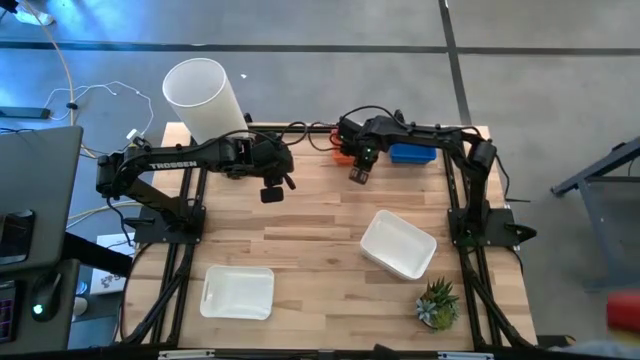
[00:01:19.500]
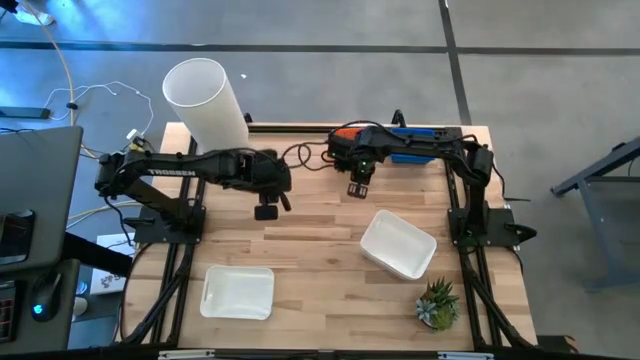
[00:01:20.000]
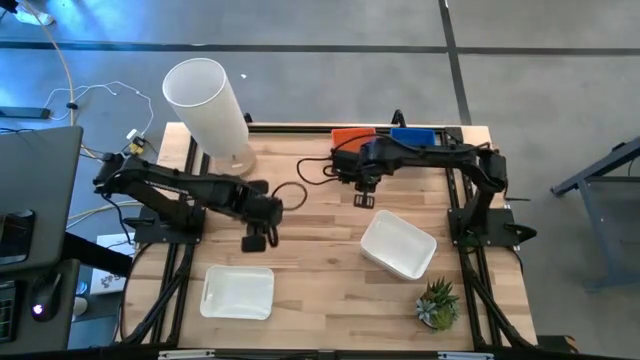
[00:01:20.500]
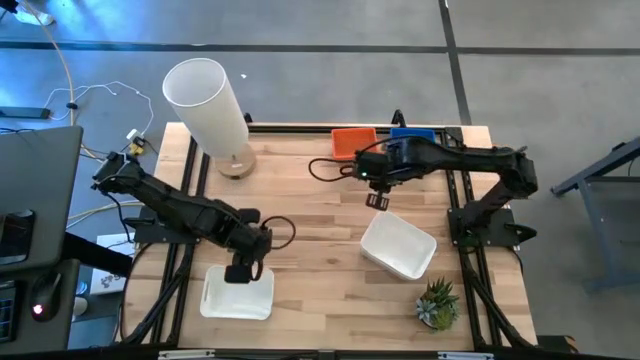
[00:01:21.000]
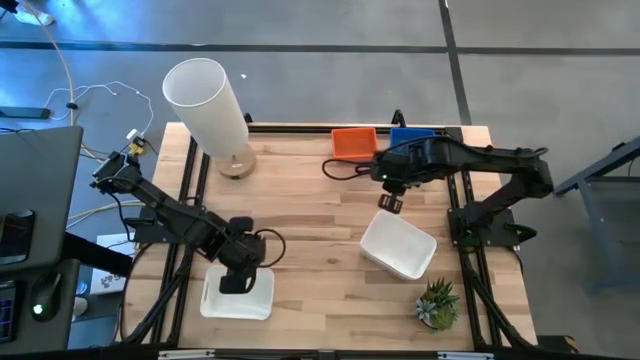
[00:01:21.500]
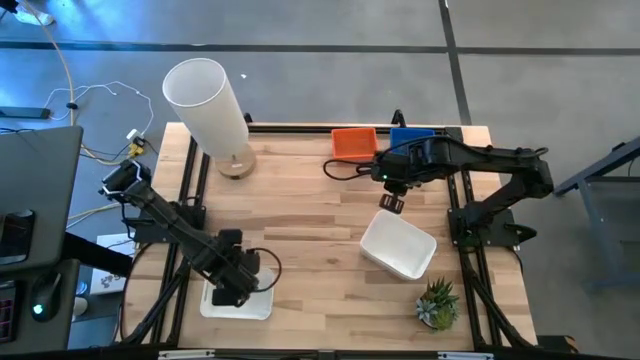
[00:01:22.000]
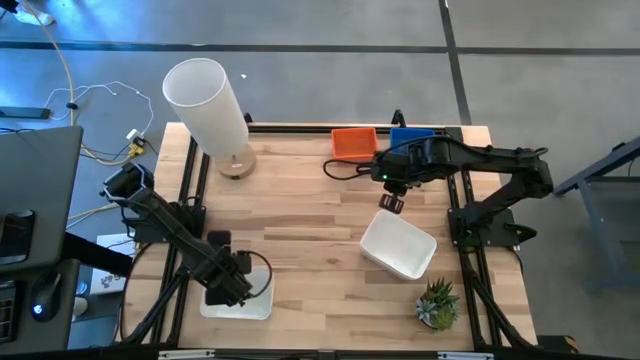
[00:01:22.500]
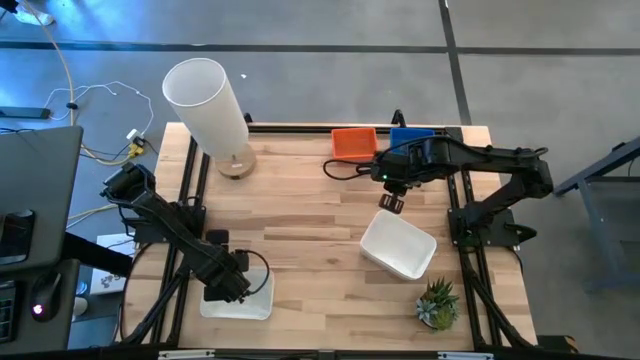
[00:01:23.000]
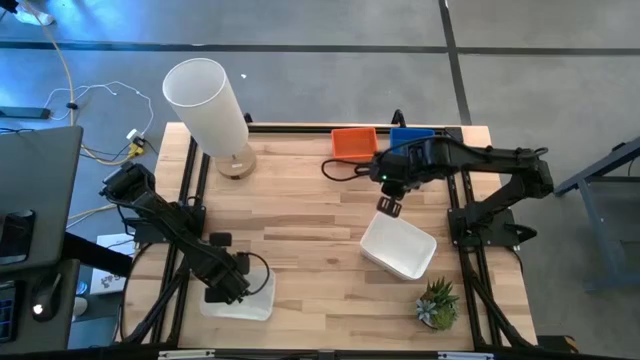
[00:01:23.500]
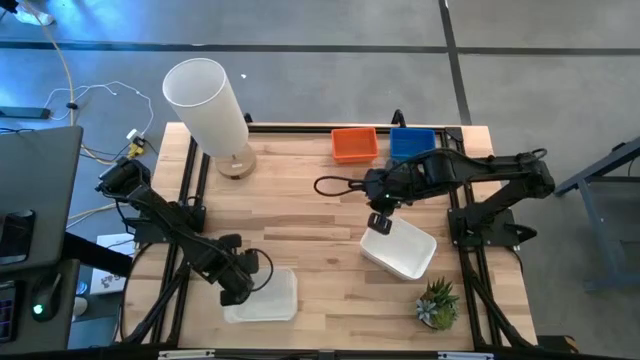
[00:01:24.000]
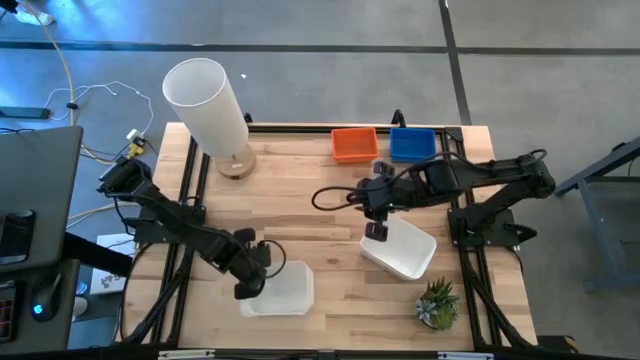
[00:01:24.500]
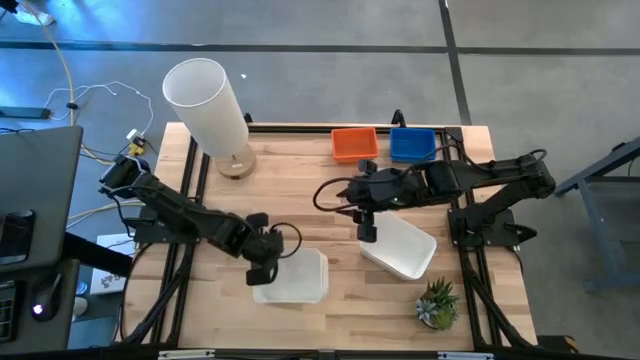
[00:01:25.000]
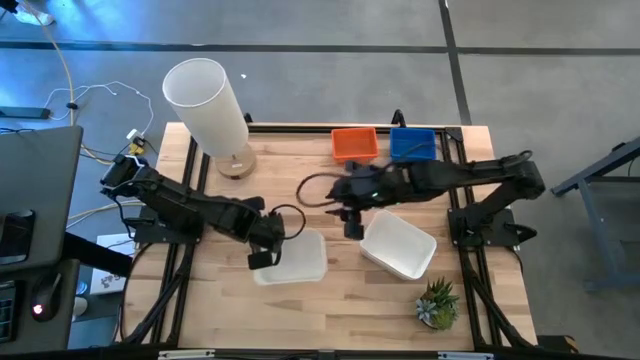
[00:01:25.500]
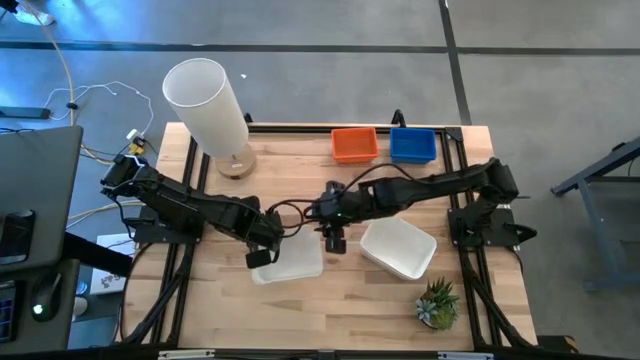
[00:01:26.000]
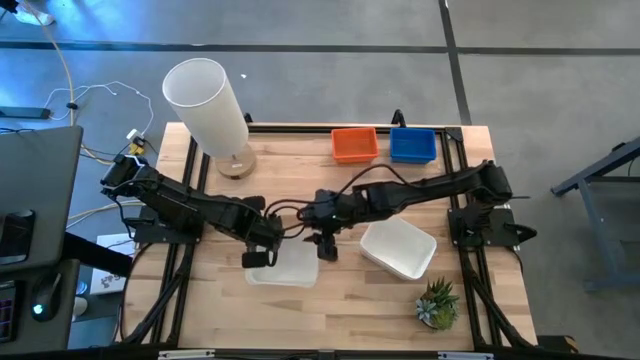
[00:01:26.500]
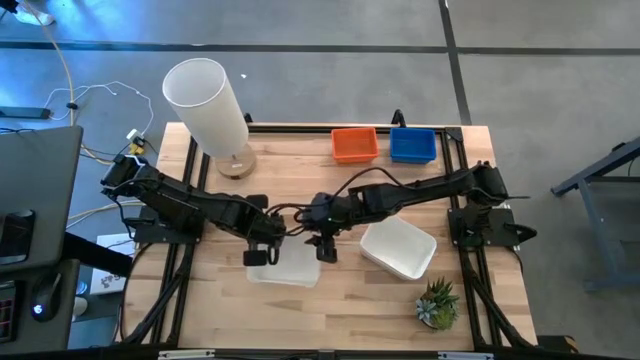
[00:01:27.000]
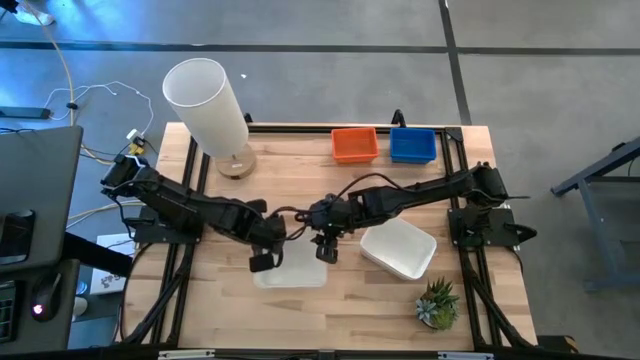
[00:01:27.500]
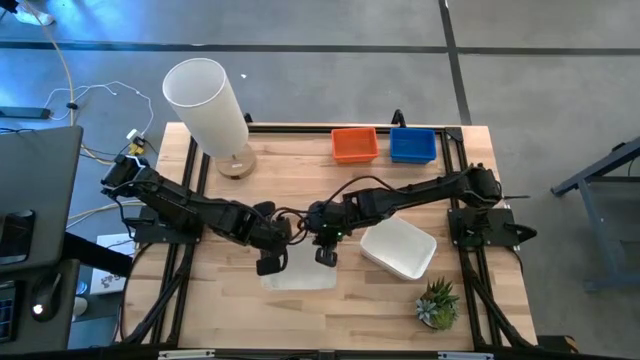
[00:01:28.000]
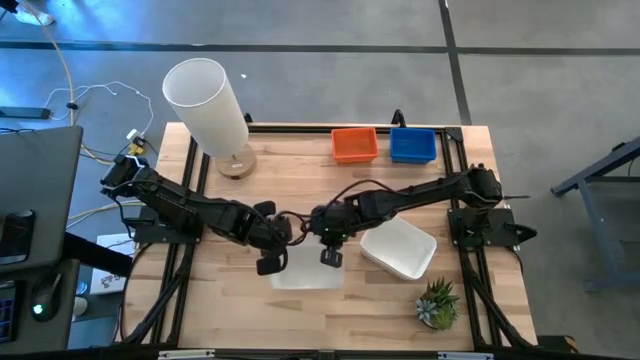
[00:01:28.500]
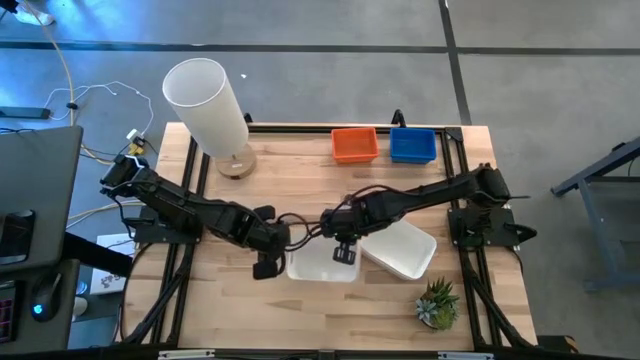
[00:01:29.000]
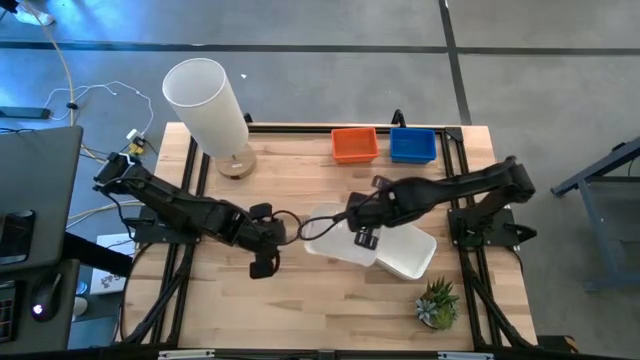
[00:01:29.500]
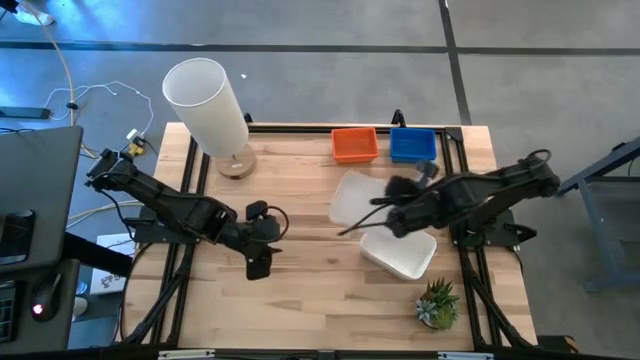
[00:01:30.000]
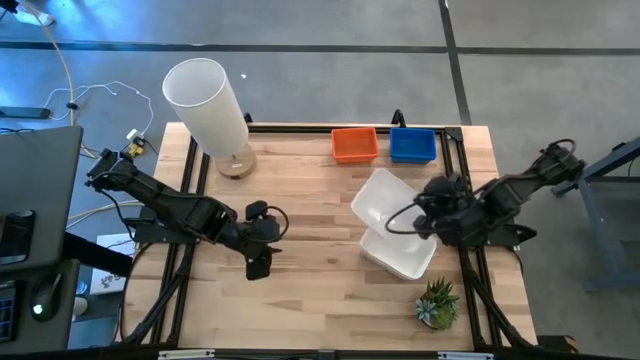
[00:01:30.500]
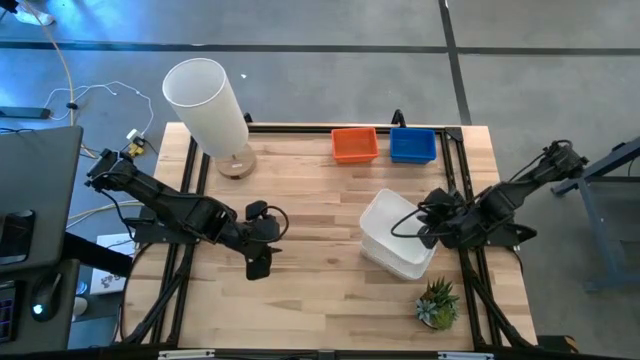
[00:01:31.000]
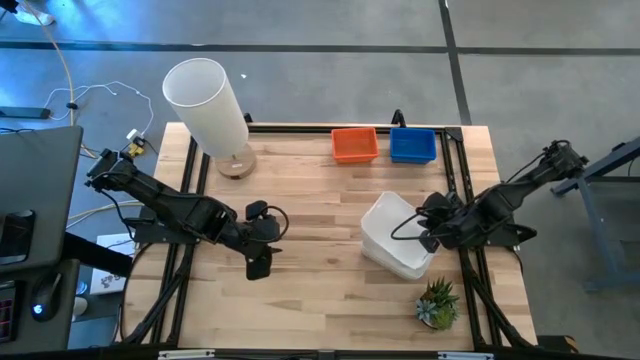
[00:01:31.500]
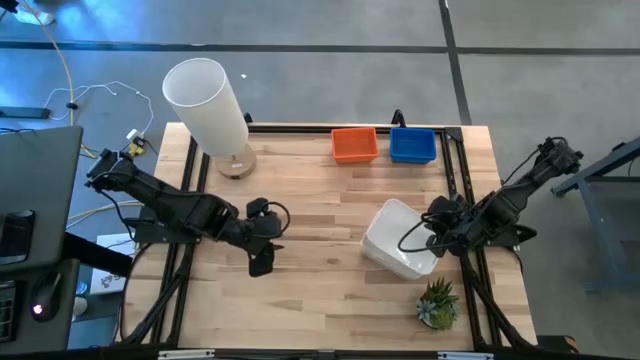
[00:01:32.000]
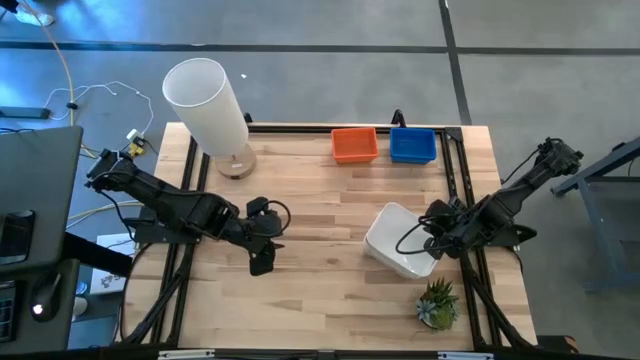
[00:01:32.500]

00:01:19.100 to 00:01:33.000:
Stack the left white bin on top of the other white bins

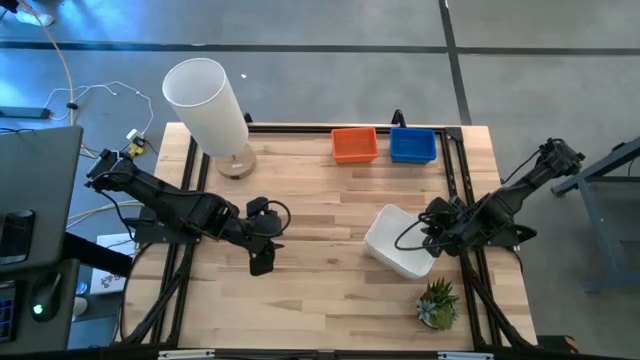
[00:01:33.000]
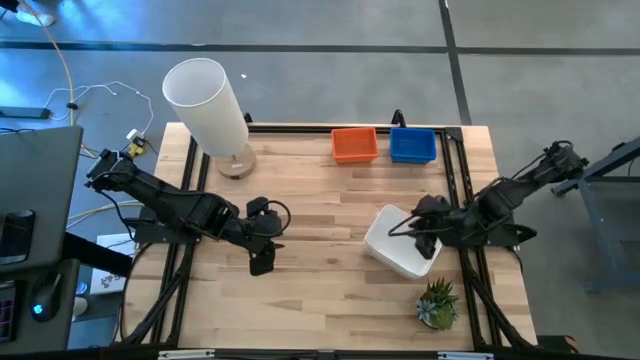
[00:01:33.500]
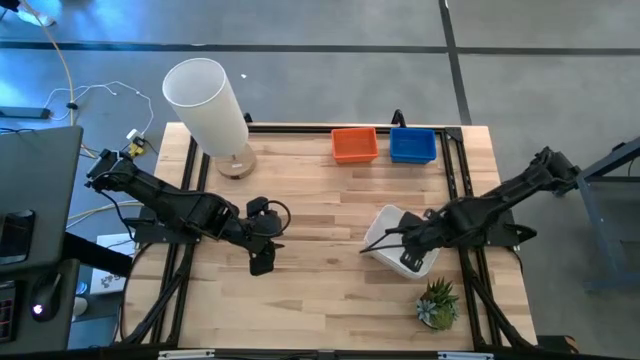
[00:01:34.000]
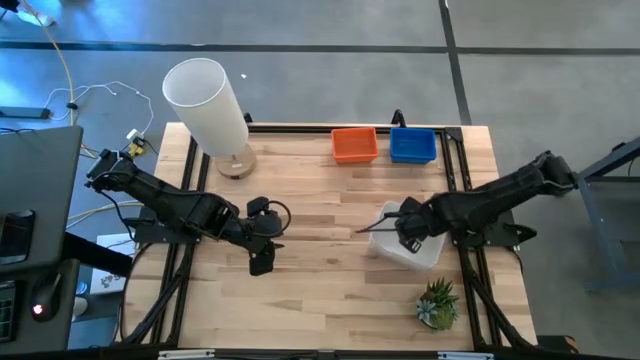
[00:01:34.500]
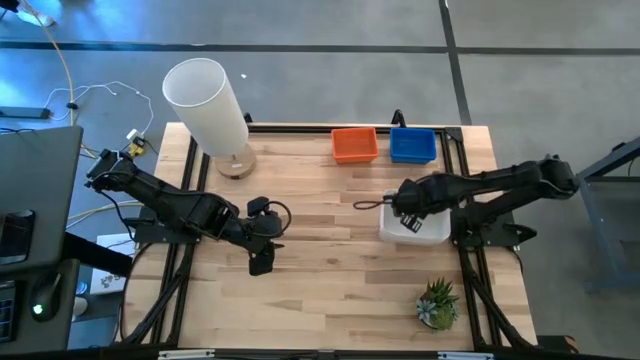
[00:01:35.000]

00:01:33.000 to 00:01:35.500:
Move the stacked white bins to the top of the table
